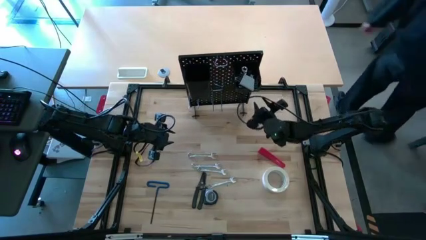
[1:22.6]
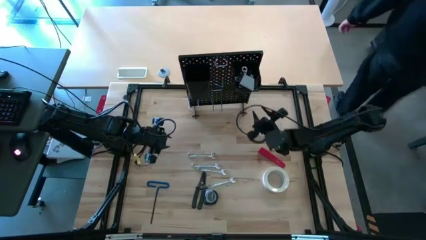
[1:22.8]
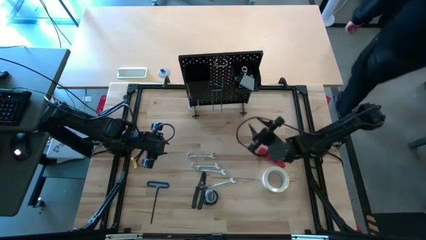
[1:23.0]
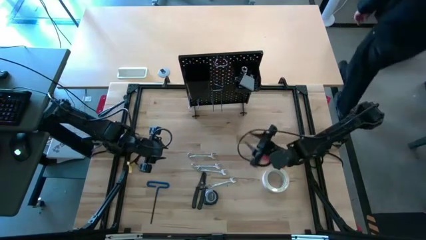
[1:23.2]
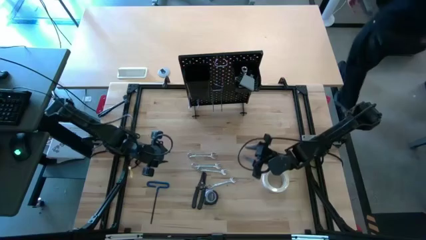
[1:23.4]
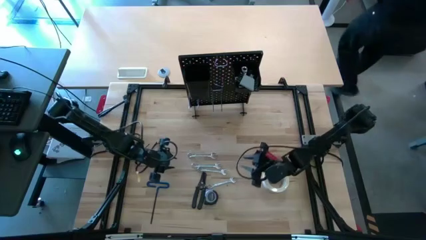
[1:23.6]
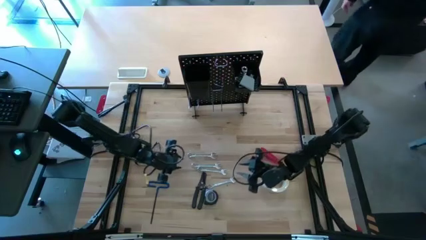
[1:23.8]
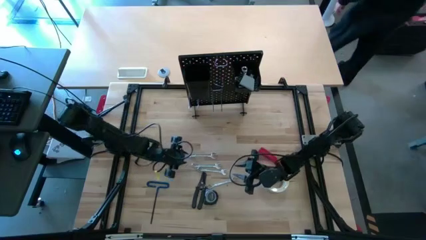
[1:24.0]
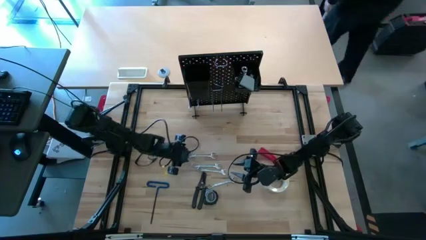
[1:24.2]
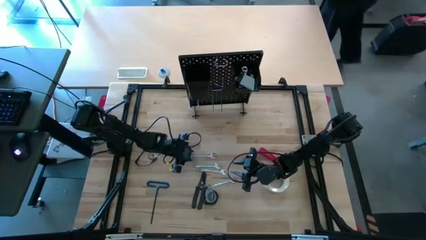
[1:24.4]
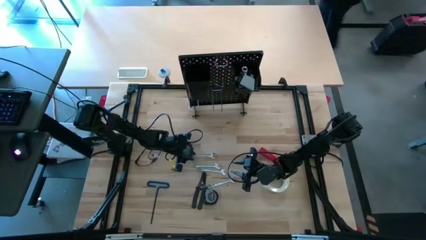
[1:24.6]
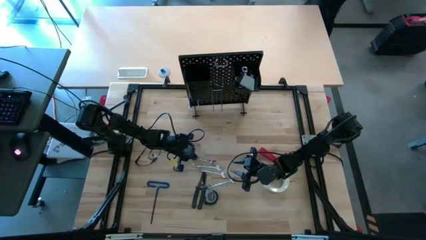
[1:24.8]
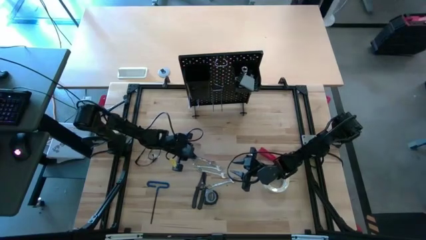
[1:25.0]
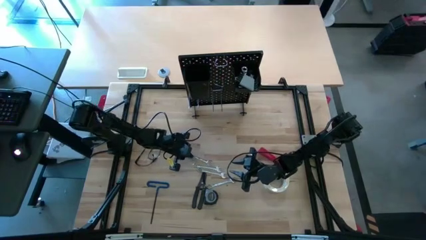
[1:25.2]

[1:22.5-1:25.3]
Task: Hang tools onto peg board
Hang the combination wrench on the pegboard

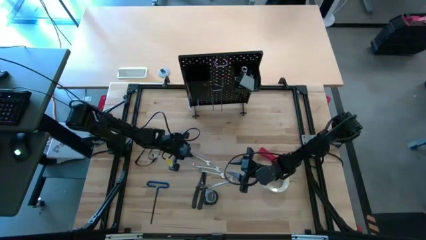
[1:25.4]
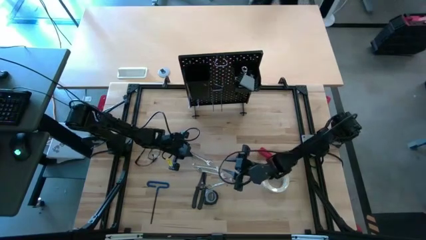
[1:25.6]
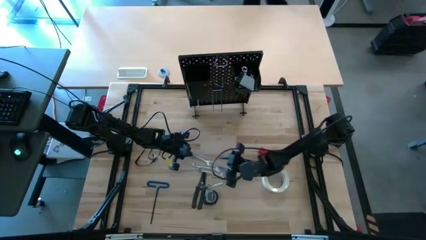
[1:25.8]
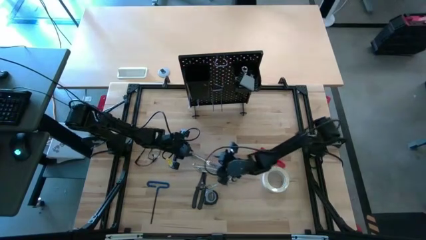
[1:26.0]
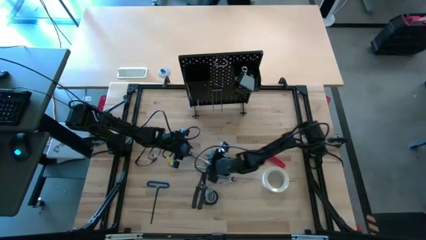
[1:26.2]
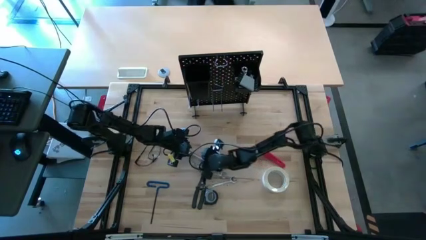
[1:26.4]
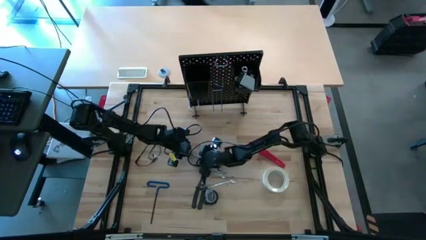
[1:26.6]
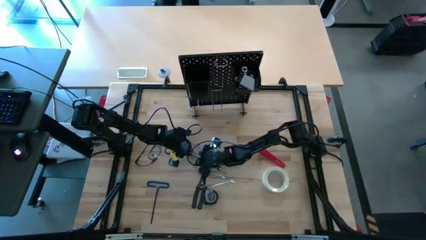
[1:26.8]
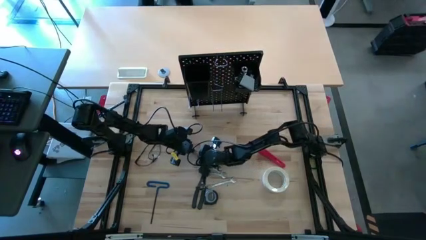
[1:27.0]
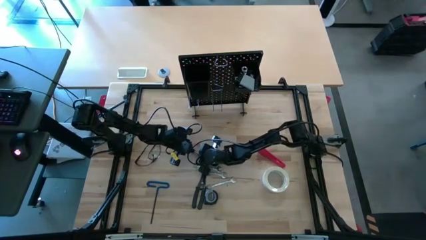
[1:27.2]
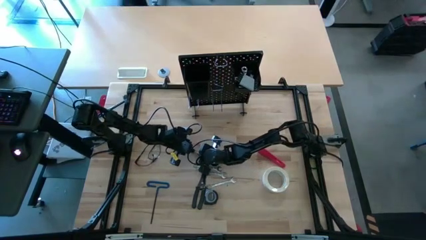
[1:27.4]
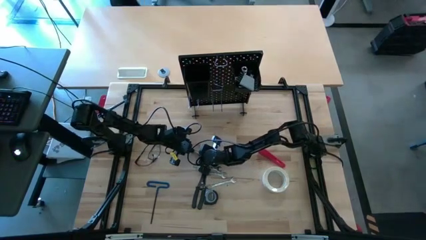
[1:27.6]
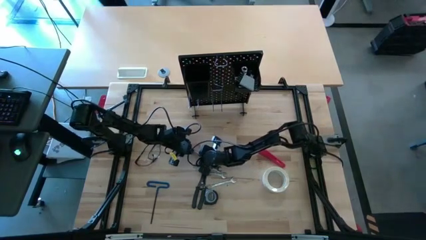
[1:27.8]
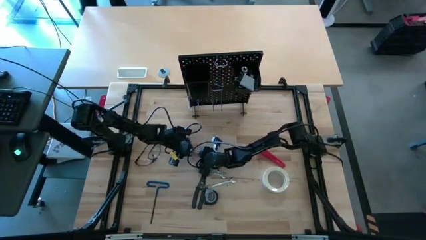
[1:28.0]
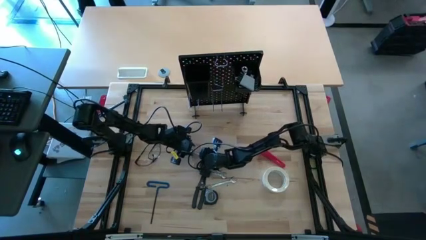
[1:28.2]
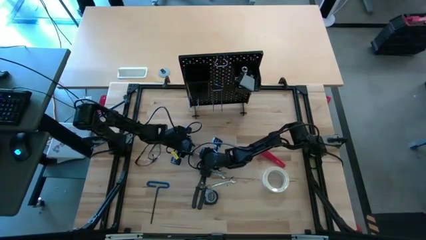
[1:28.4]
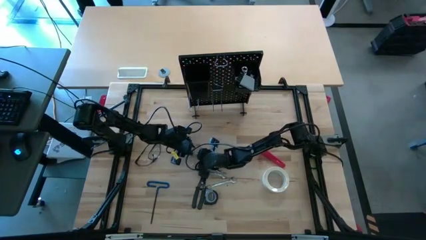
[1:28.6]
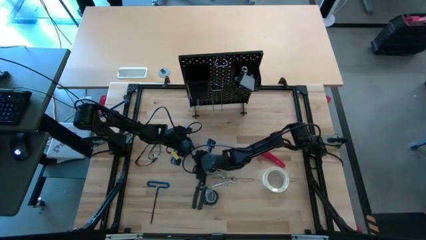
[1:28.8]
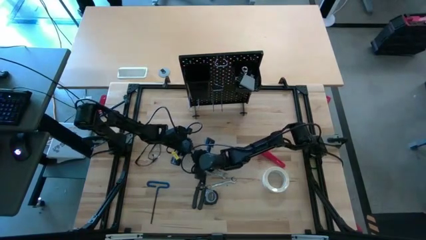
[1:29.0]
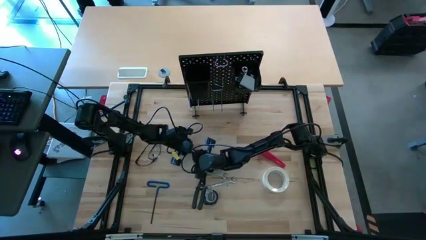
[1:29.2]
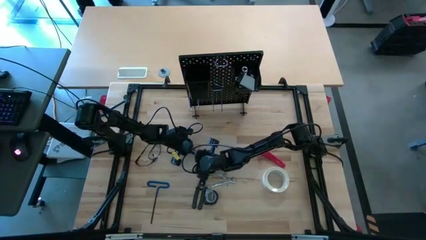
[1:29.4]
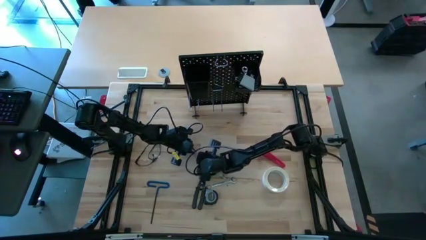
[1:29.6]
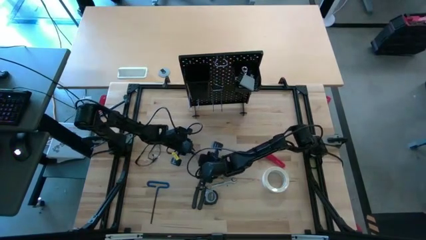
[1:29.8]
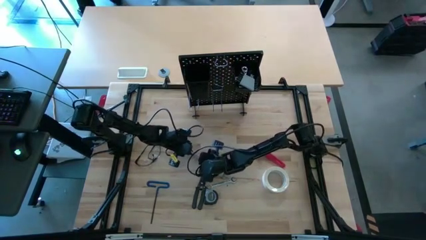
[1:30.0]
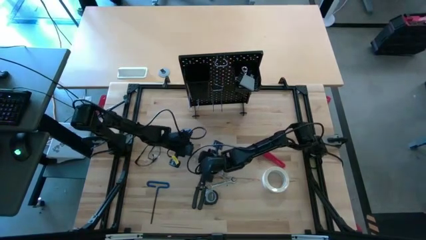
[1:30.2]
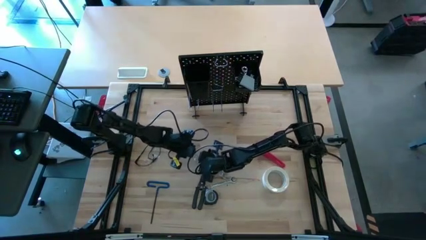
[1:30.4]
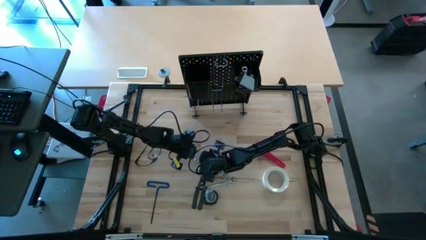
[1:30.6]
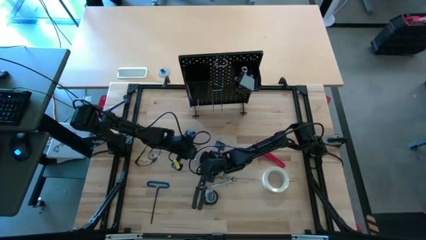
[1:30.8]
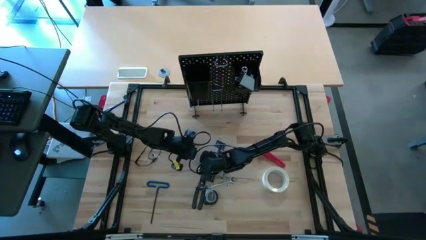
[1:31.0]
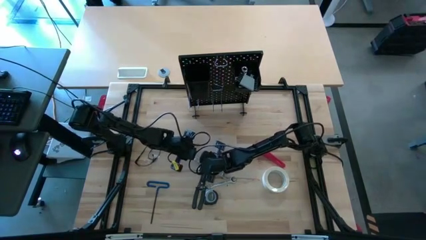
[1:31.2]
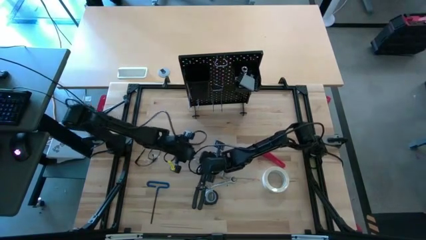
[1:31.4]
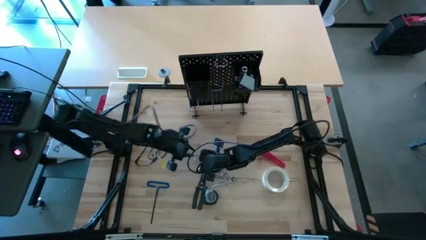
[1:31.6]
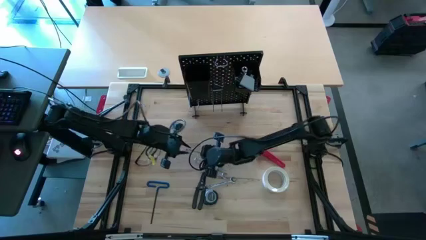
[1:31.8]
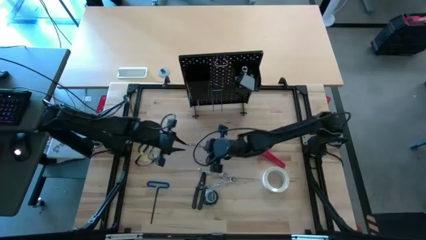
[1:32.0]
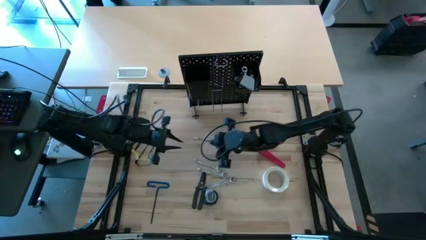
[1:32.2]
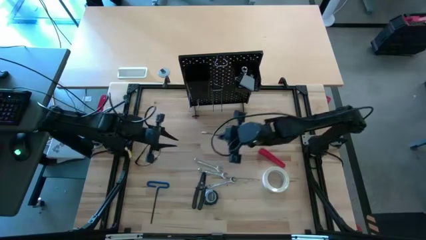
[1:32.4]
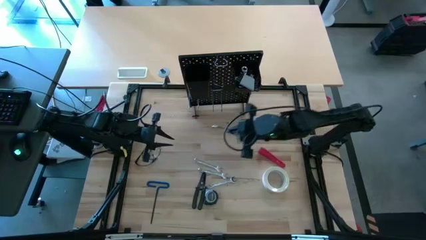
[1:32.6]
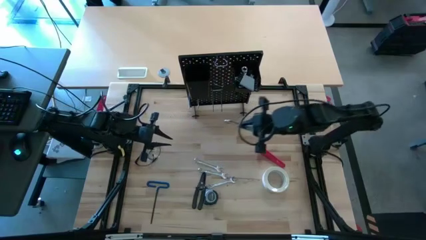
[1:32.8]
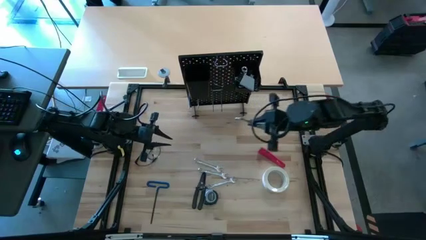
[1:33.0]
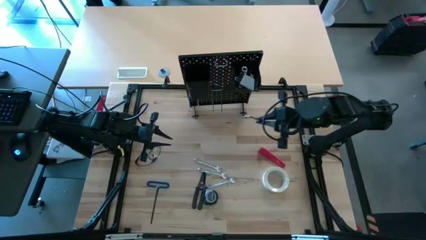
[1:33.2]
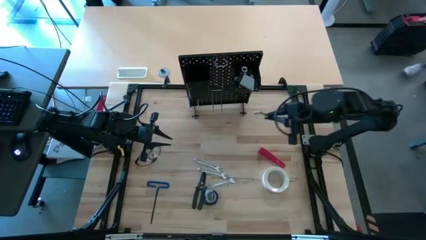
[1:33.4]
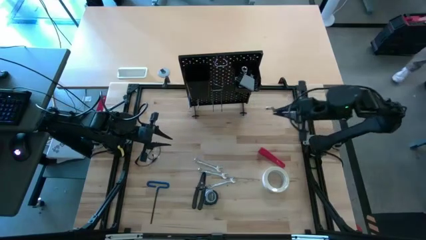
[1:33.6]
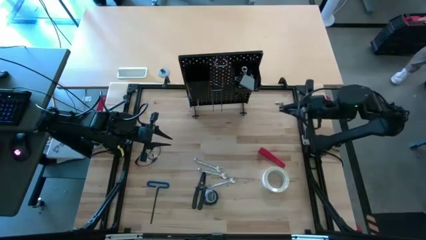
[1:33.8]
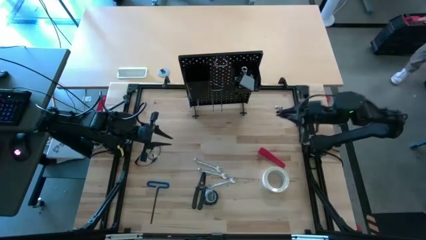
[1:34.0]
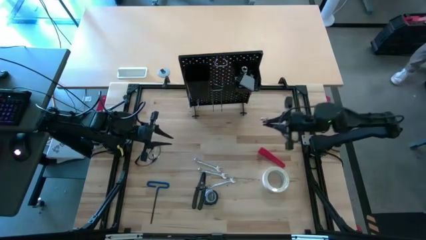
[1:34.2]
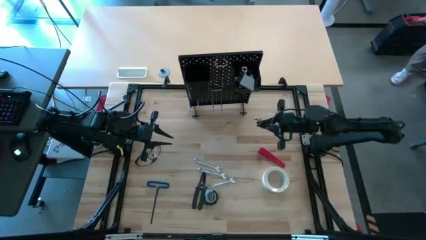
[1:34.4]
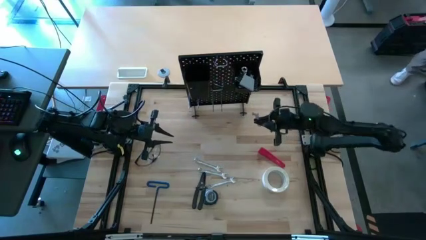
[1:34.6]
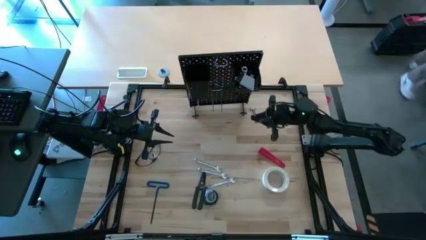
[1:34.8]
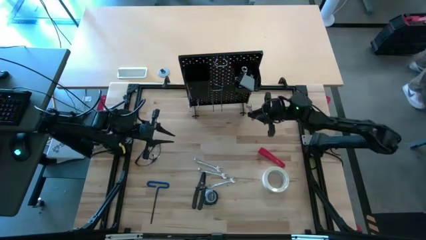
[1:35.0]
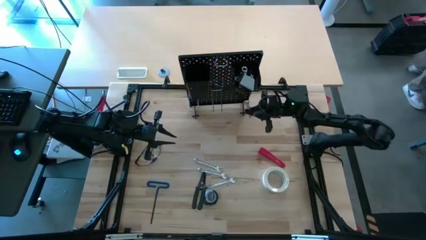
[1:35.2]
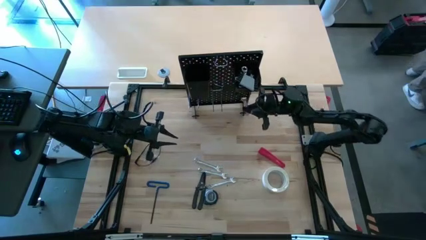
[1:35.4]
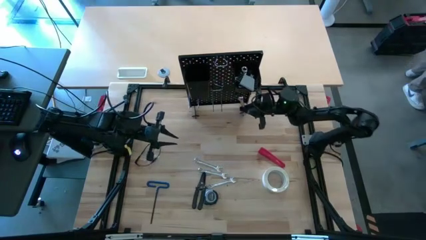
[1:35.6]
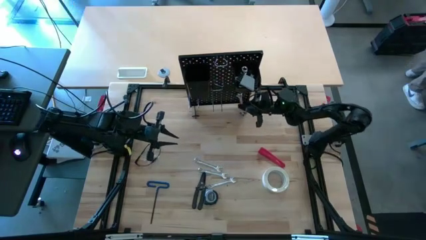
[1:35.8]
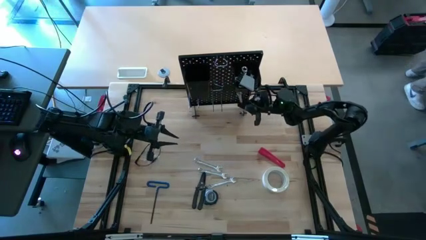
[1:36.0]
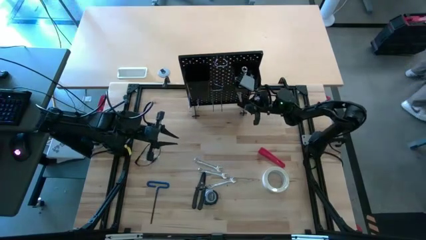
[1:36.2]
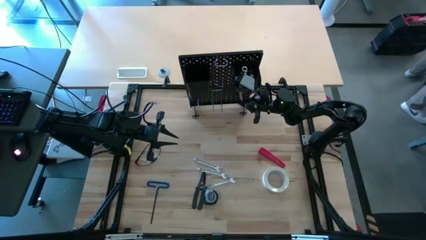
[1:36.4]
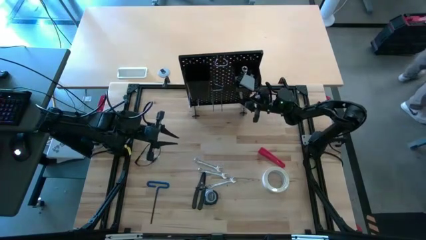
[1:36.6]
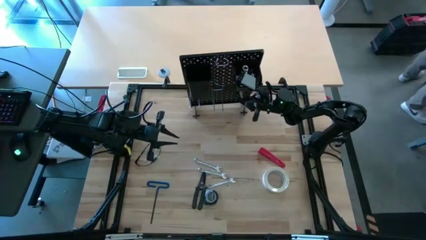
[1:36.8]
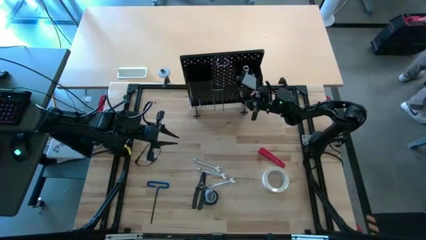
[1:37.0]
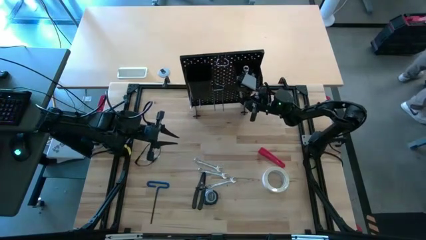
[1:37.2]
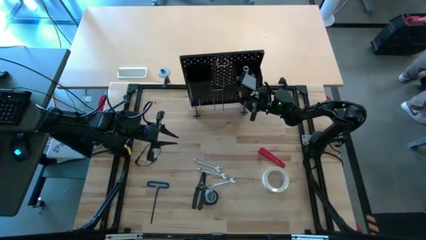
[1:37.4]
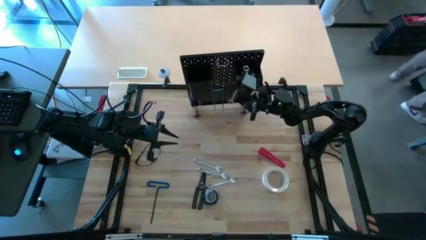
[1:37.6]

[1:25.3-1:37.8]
Hang the top silver wrench on the pegboard

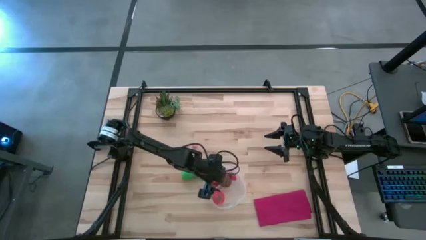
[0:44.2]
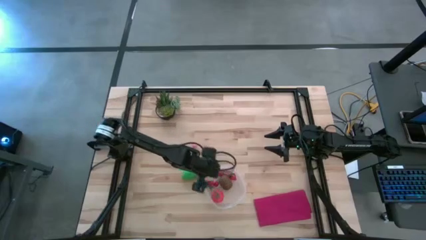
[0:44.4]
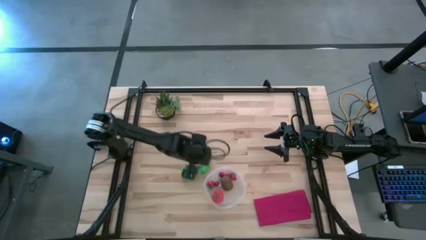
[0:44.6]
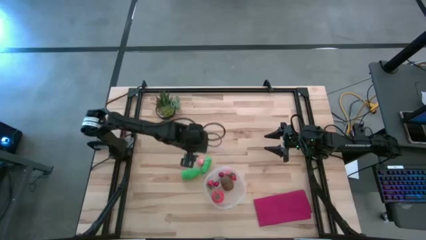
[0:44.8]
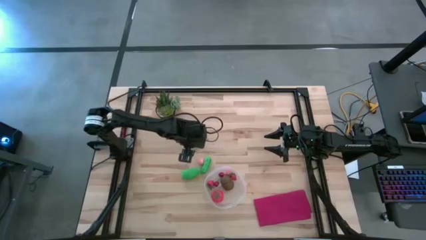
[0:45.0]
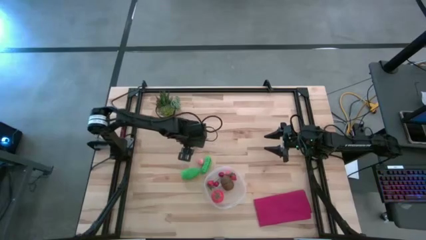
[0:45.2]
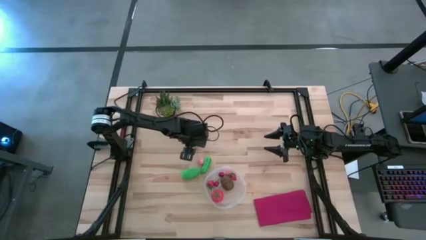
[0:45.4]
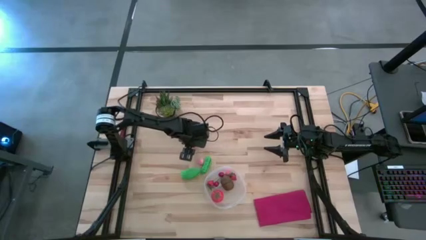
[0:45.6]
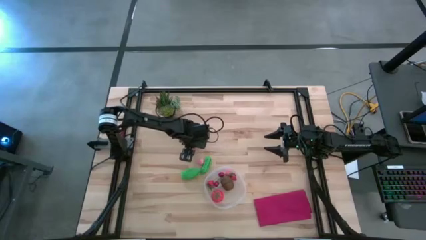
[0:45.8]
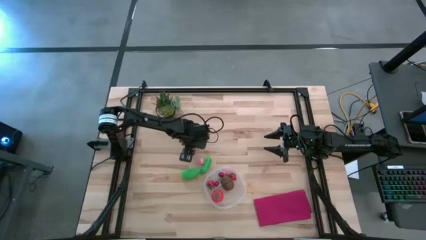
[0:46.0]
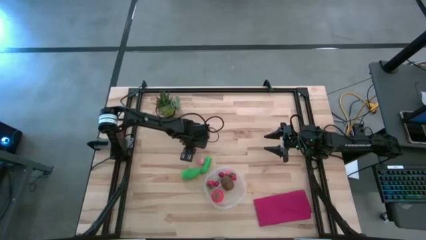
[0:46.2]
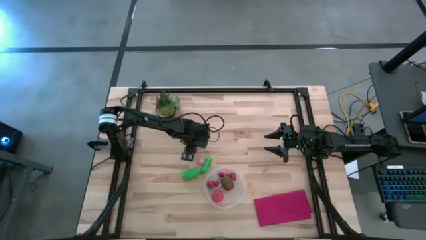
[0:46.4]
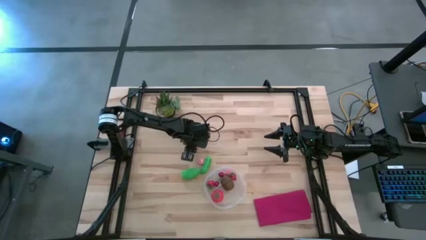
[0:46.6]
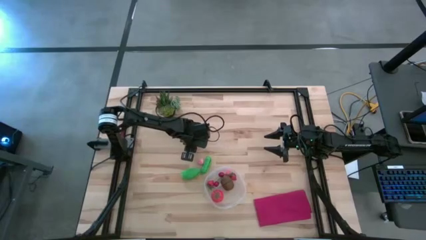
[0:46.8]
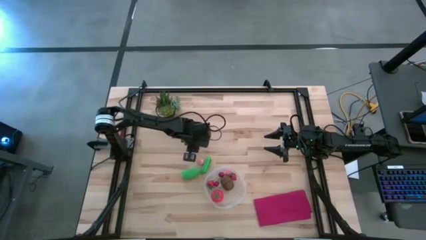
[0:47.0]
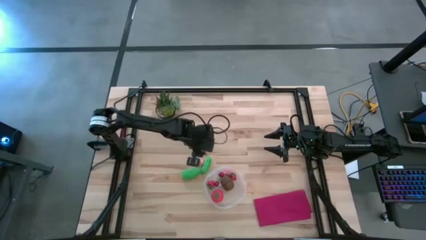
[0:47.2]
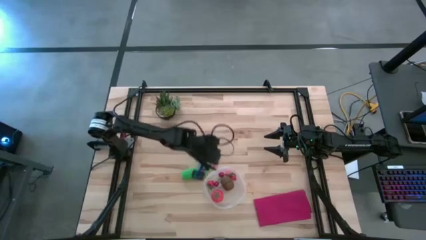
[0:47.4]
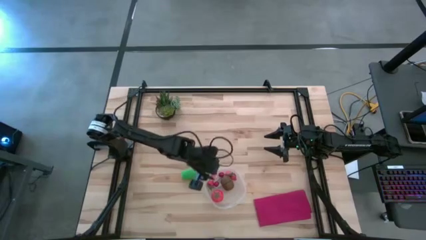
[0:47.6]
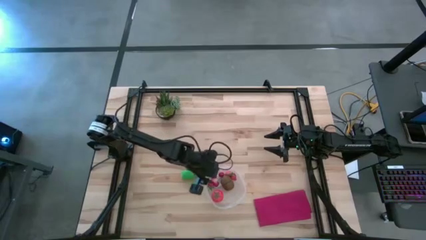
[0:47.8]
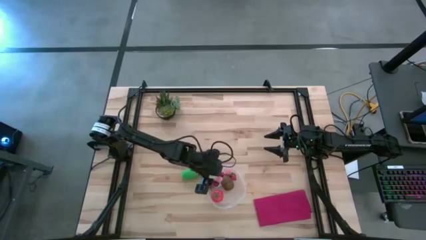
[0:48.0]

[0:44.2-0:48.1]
Task: Pick and placing Produce into tupperware
Put the top pink peach into the transparent bin
